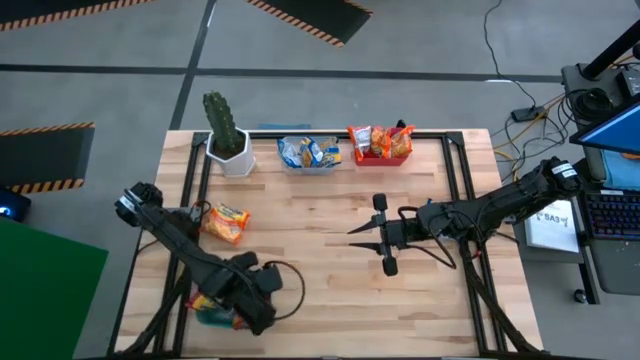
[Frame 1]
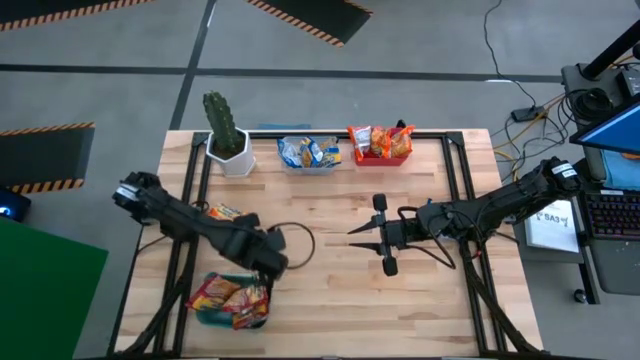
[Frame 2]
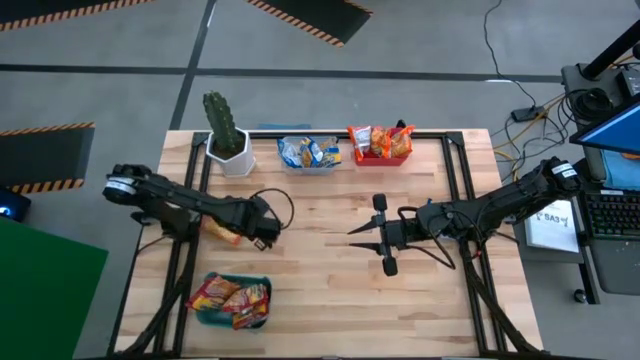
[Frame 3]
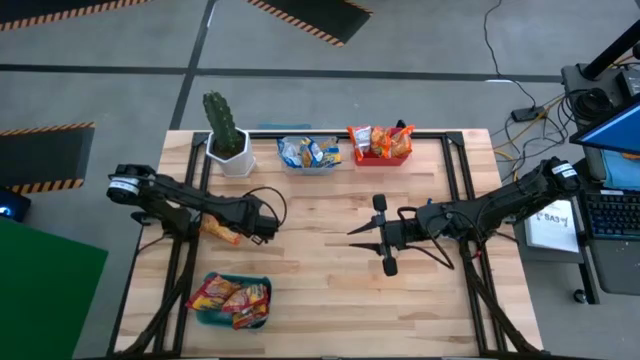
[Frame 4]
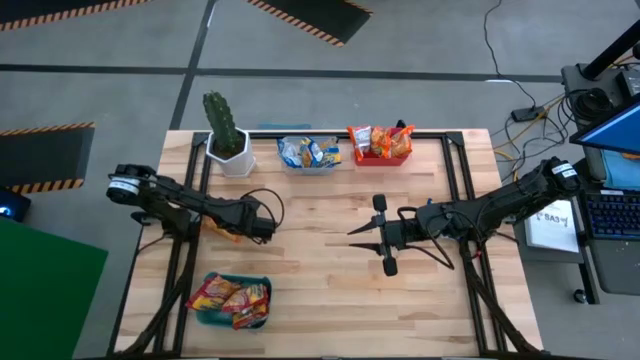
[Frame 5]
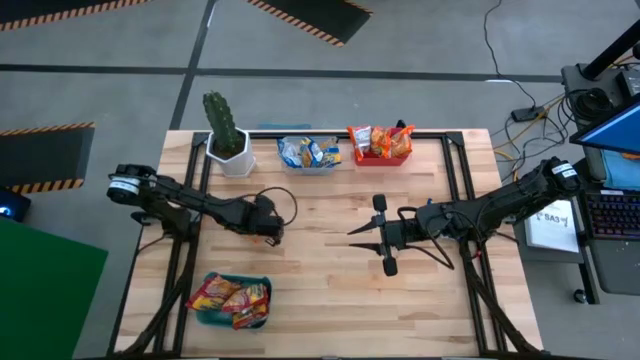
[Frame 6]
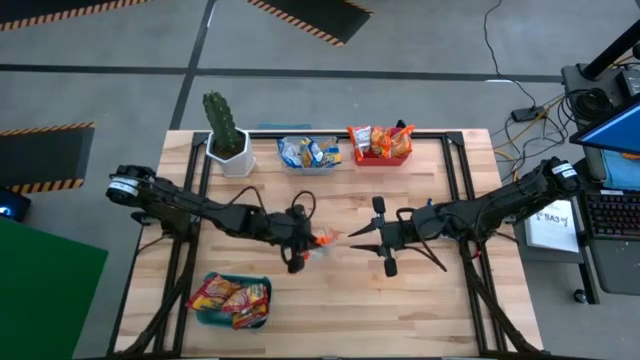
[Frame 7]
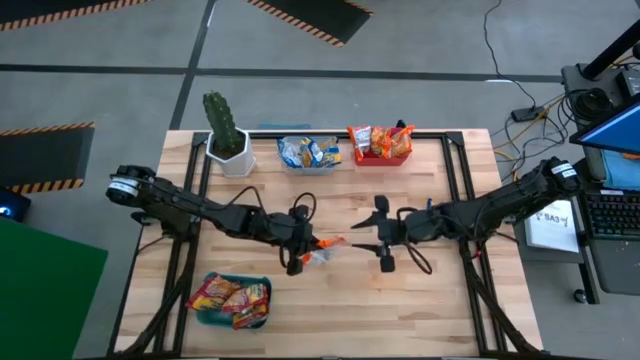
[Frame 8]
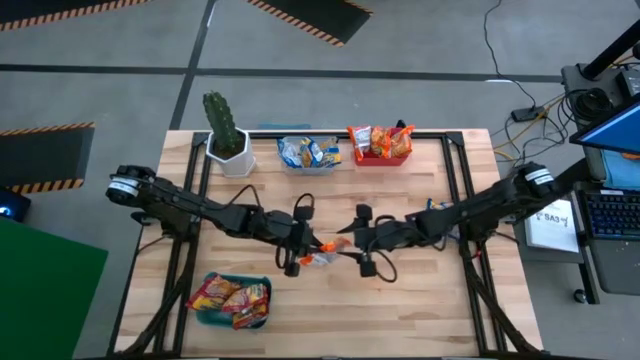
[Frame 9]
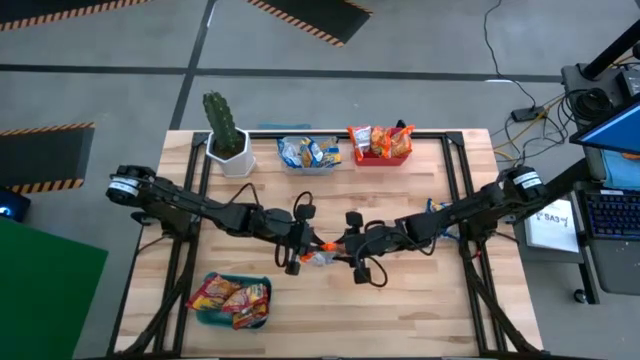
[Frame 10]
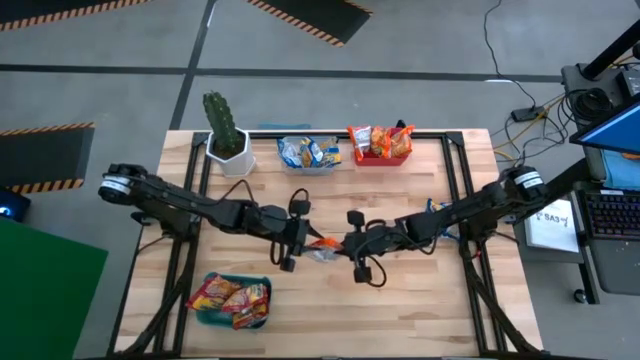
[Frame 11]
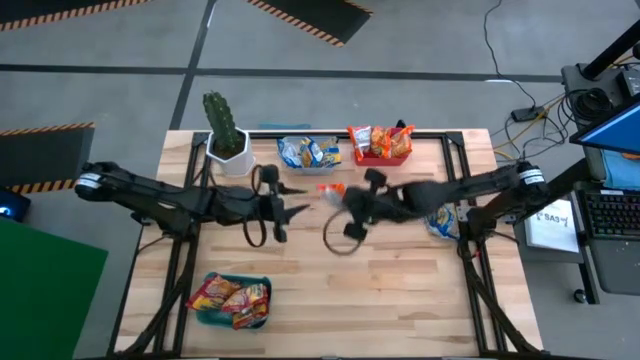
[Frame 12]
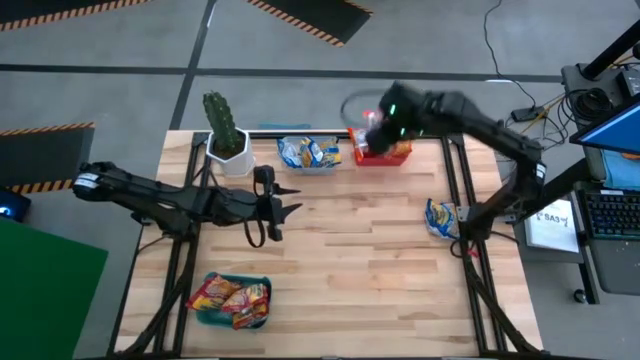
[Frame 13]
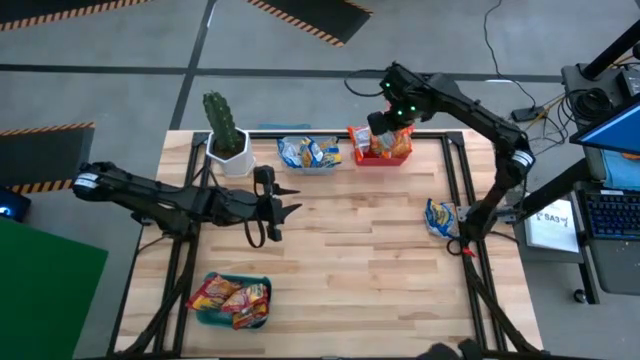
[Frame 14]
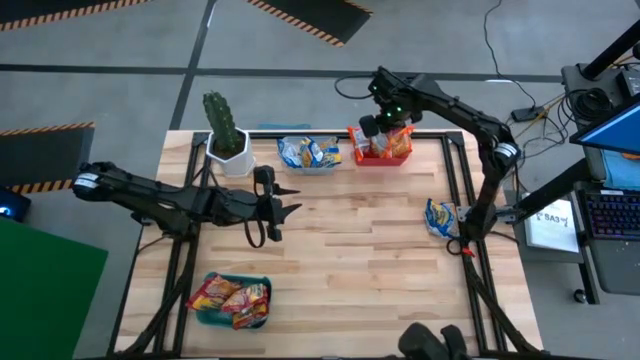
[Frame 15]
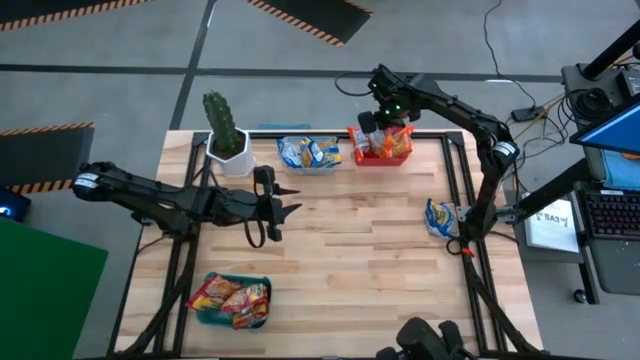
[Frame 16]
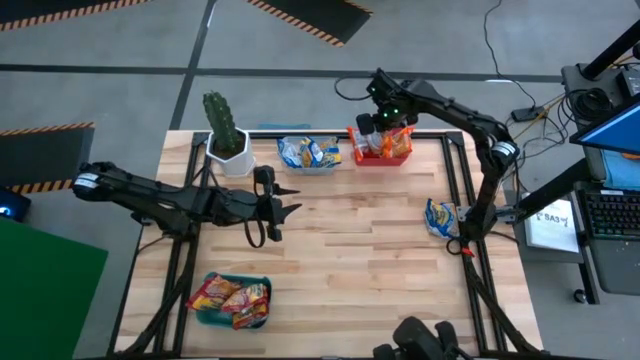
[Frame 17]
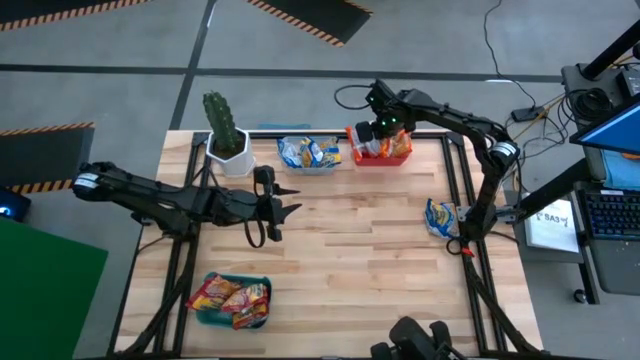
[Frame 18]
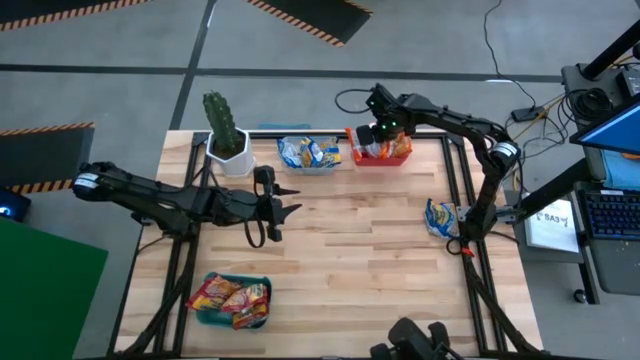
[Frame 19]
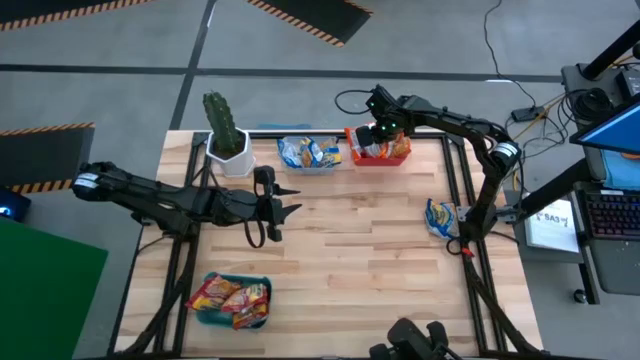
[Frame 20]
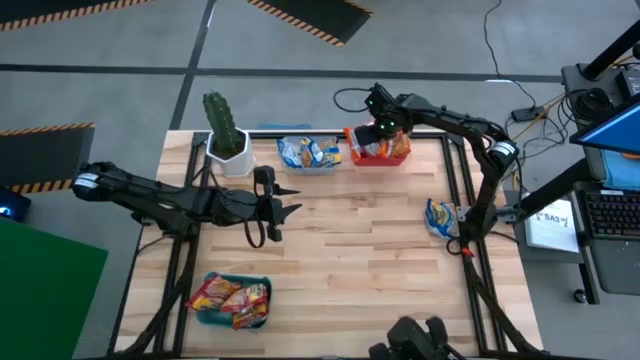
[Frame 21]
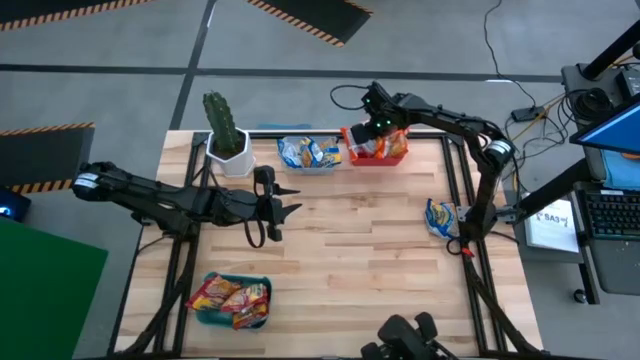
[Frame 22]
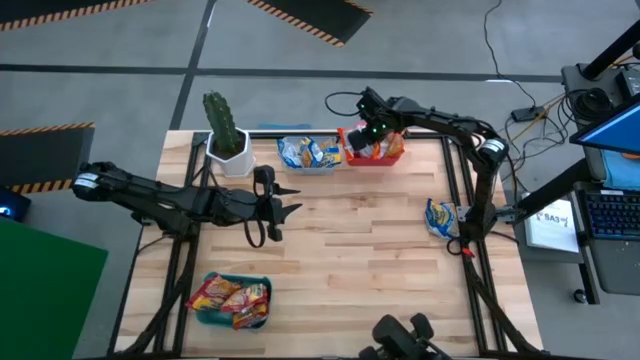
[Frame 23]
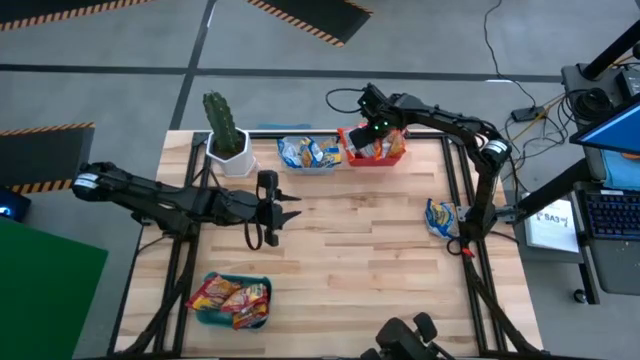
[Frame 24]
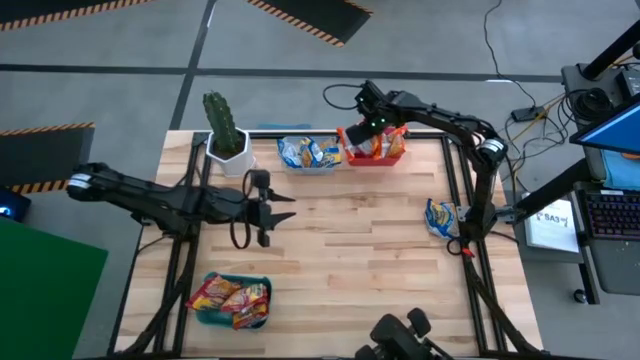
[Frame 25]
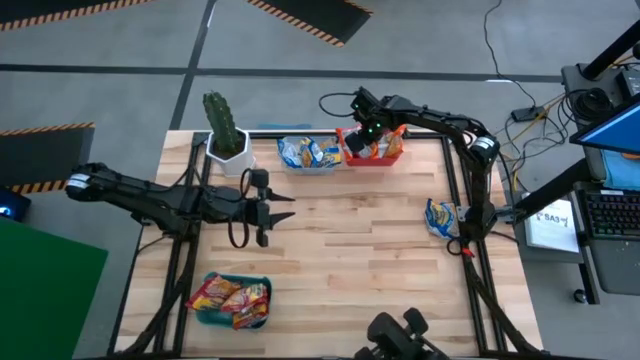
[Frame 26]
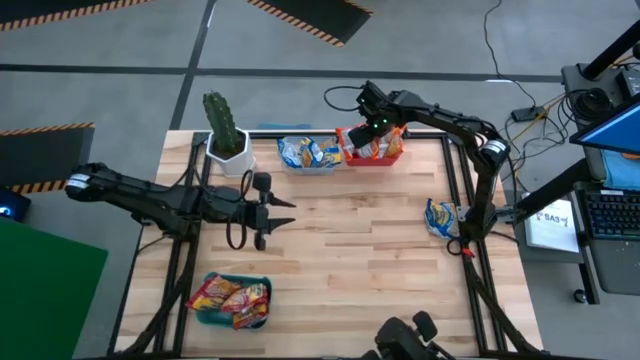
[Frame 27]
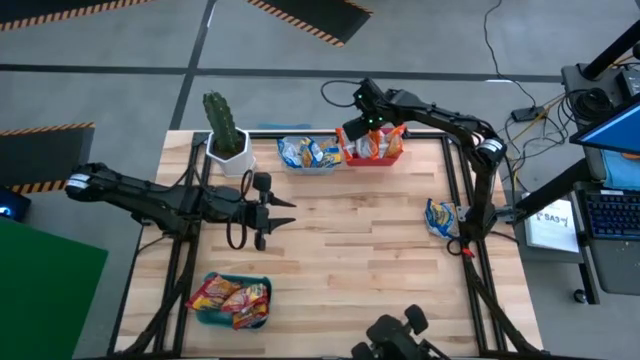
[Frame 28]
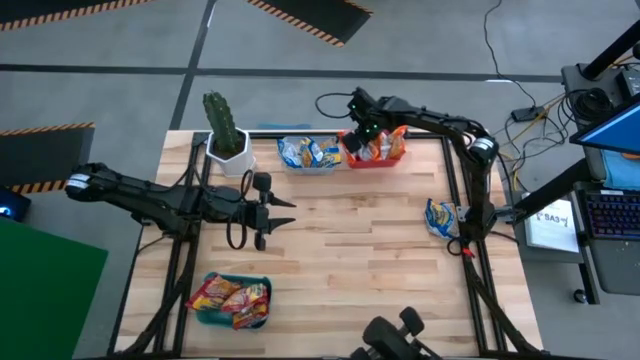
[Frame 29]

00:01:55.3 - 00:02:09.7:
Task: Sort Maruchan noodles
Put the orange noodle pack into the red bin

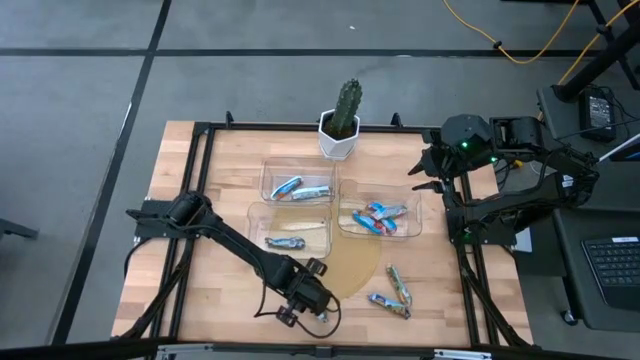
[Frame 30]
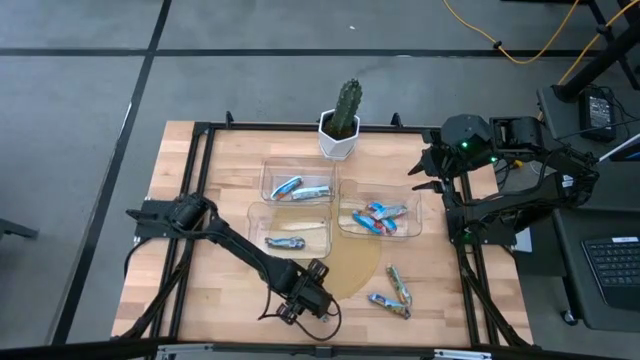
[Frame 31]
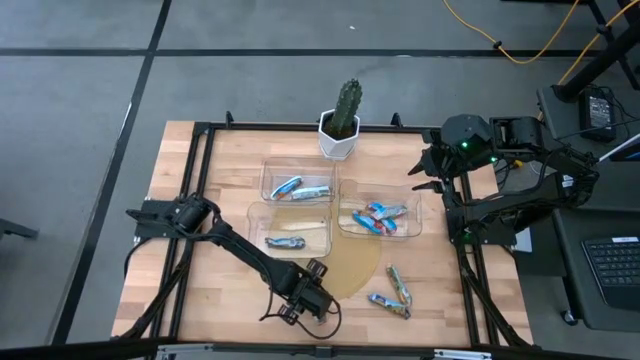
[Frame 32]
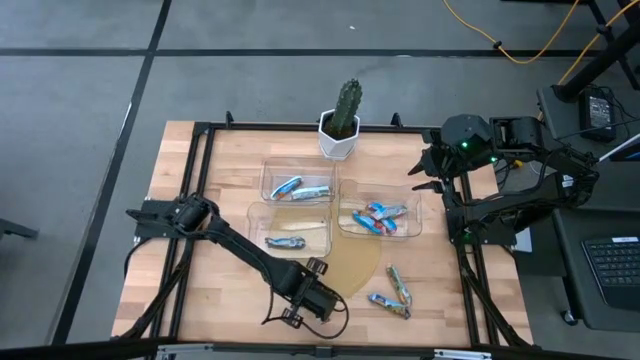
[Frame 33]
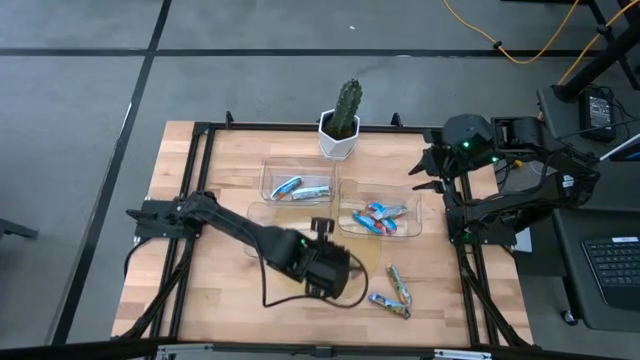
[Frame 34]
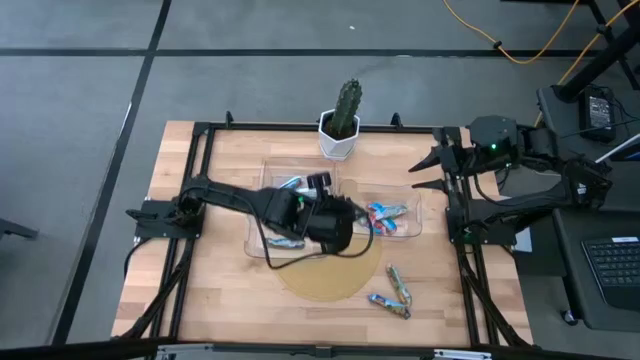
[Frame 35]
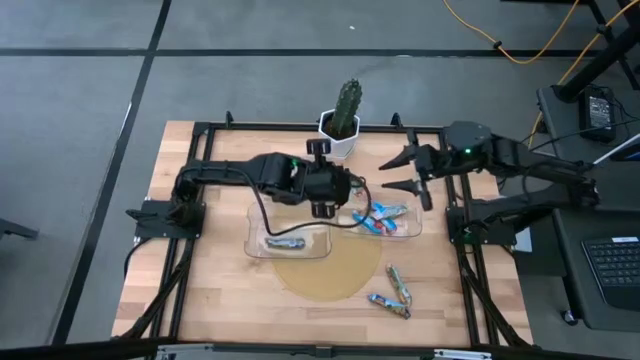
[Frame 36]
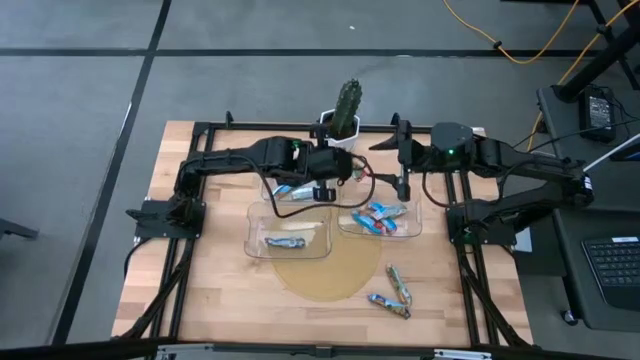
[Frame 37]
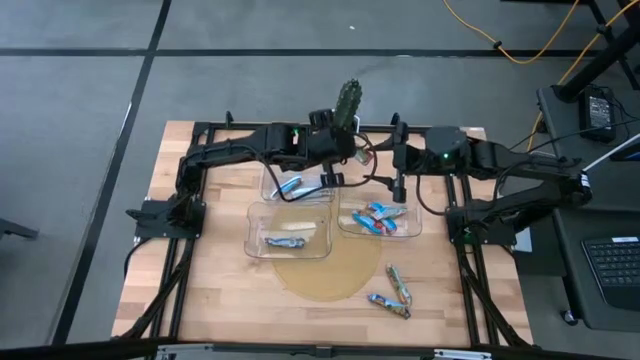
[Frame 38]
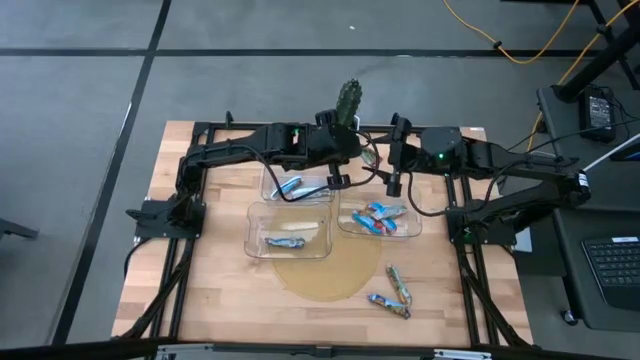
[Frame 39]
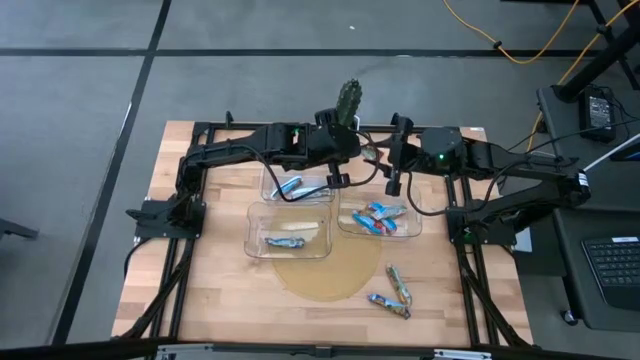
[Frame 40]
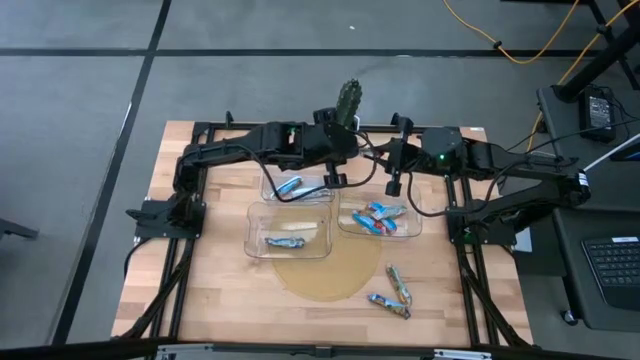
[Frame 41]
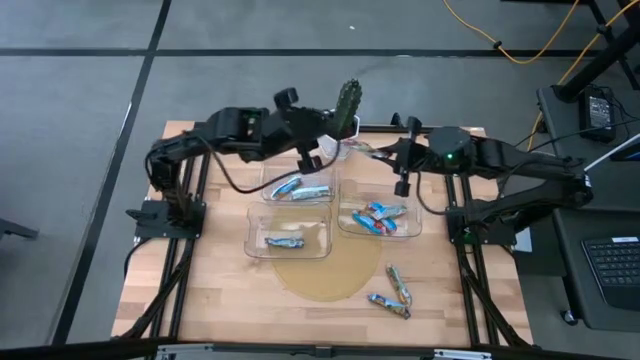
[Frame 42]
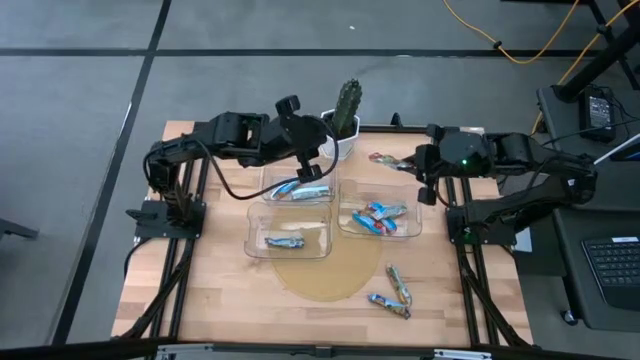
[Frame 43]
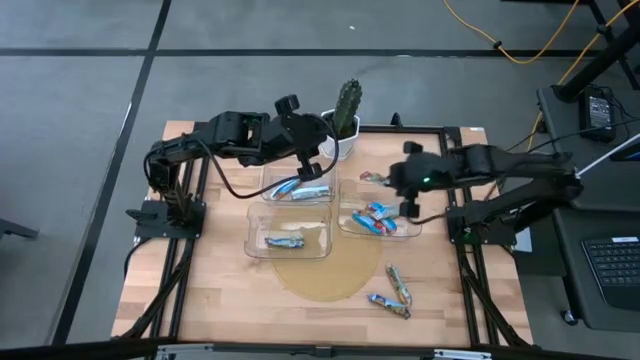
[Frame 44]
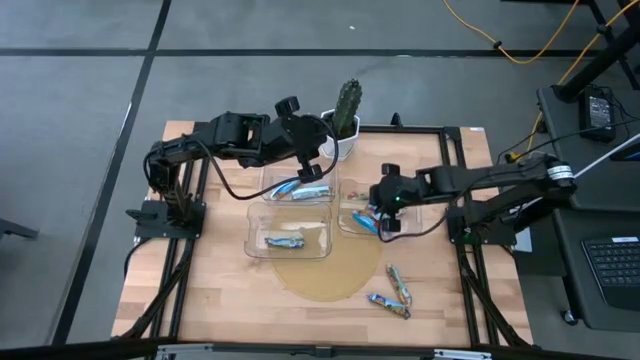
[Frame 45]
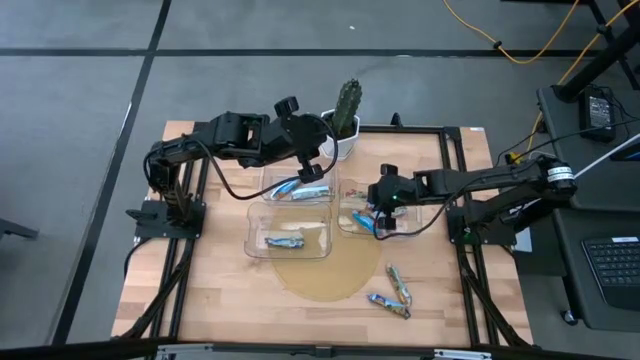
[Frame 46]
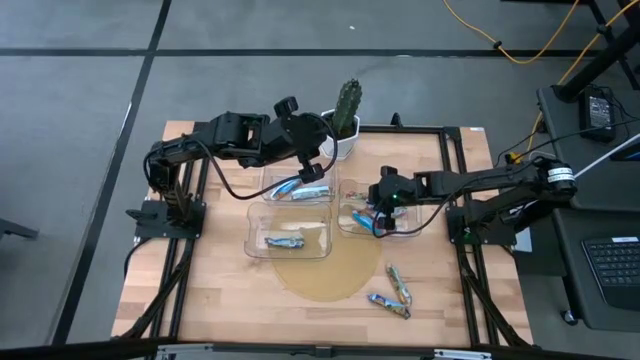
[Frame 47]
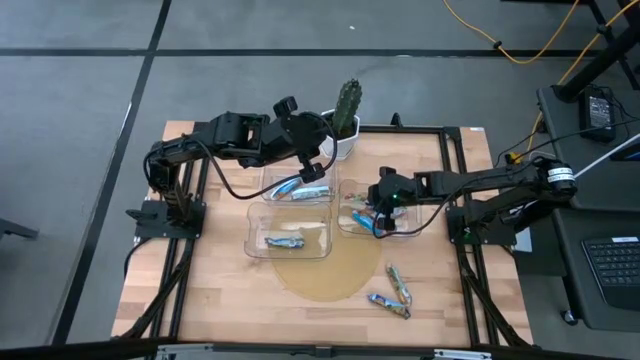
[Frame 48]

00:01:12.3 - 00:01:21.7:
Task: Pick and place Granola Bars by type
Put the red granola bar into the right bin
